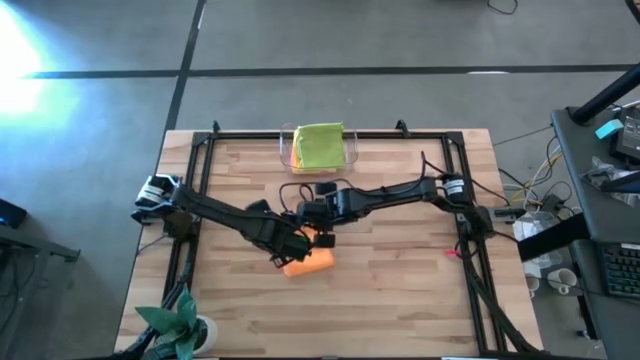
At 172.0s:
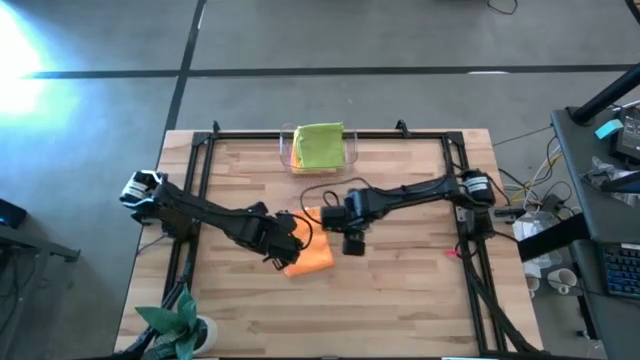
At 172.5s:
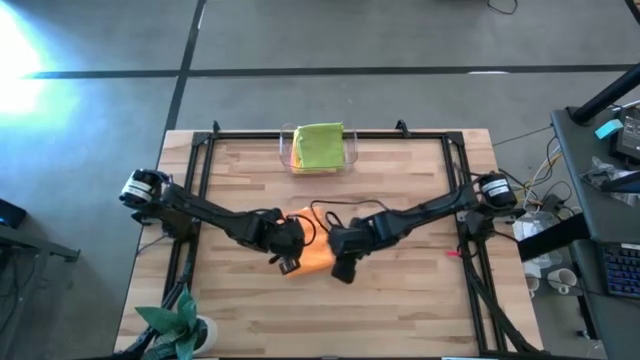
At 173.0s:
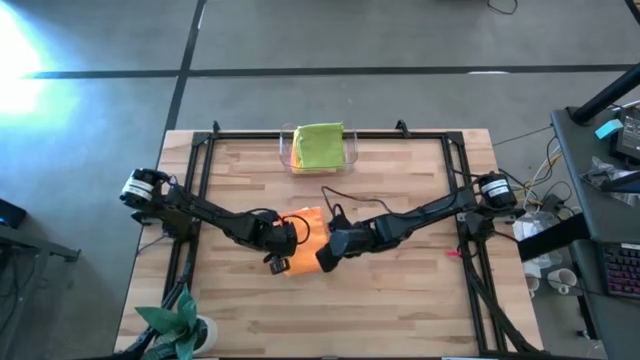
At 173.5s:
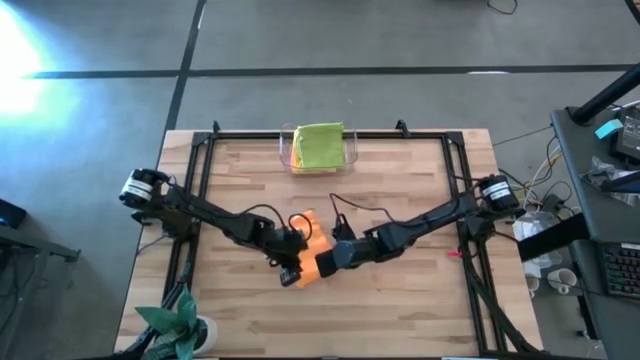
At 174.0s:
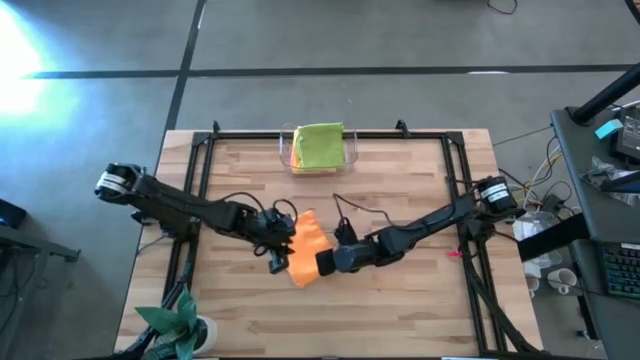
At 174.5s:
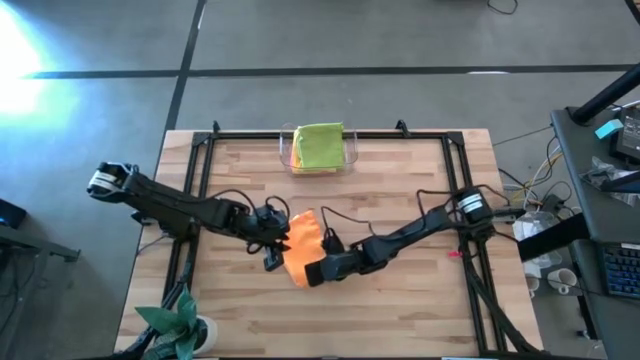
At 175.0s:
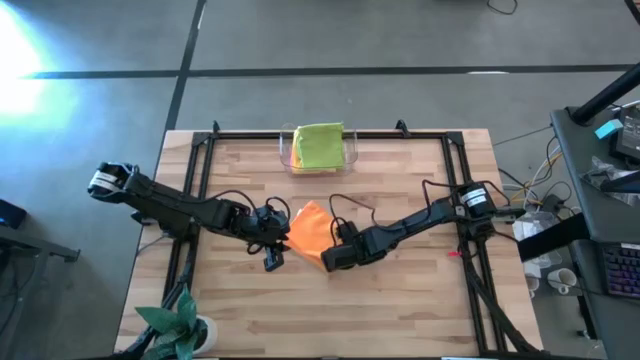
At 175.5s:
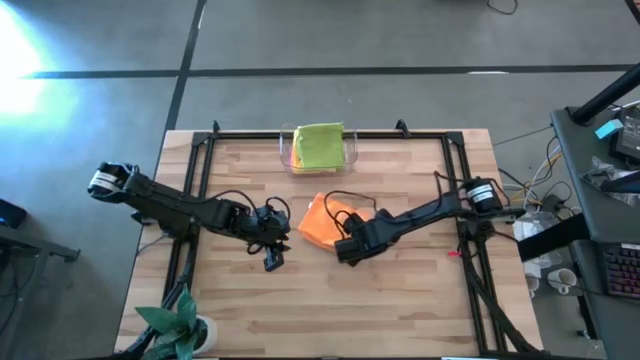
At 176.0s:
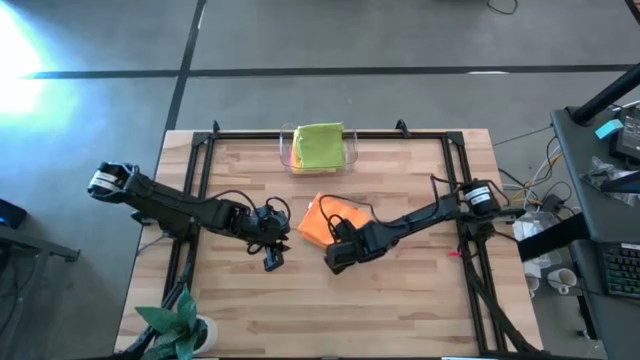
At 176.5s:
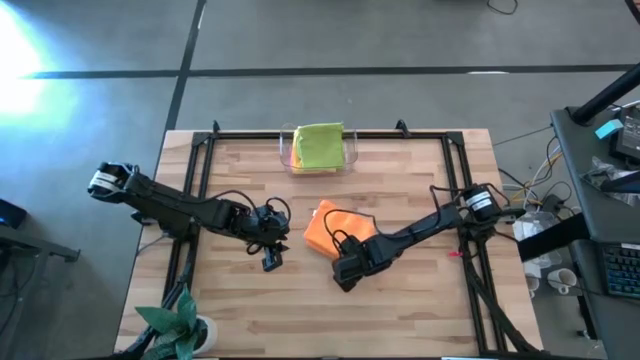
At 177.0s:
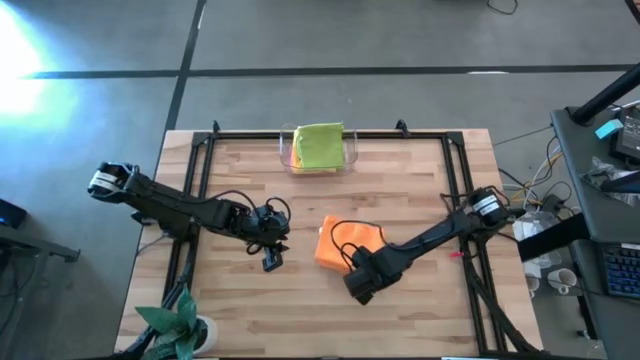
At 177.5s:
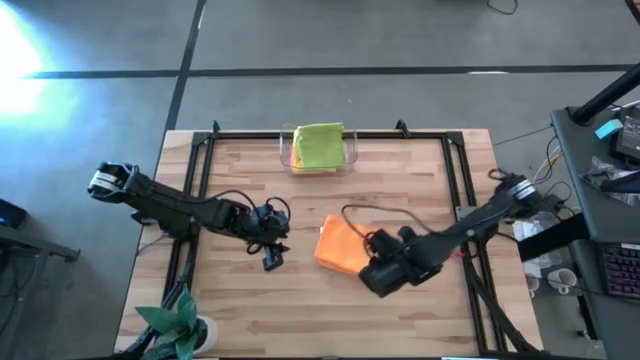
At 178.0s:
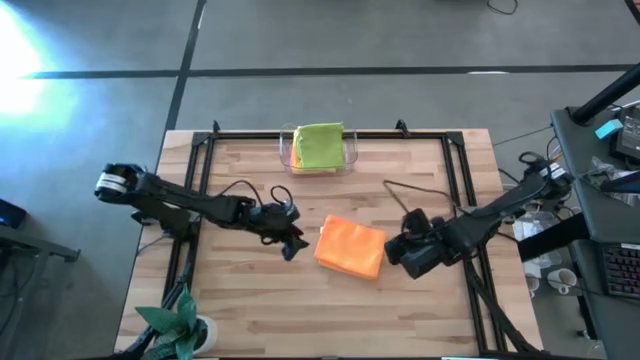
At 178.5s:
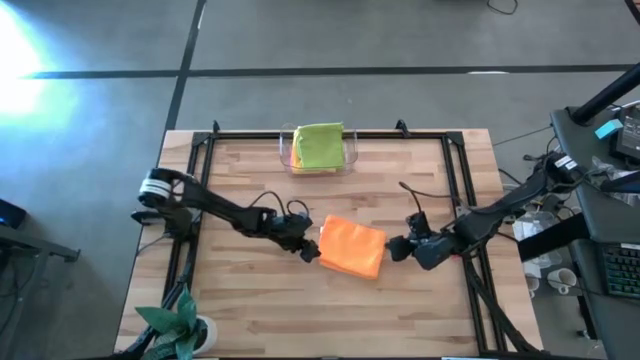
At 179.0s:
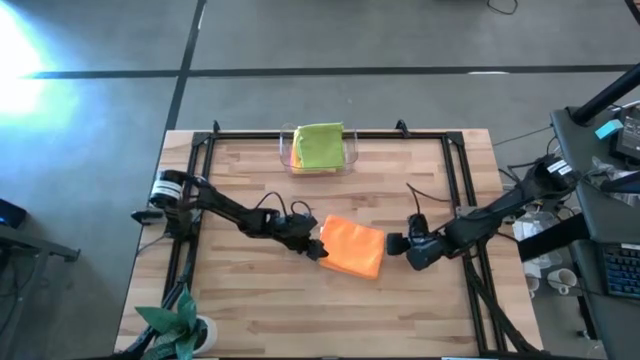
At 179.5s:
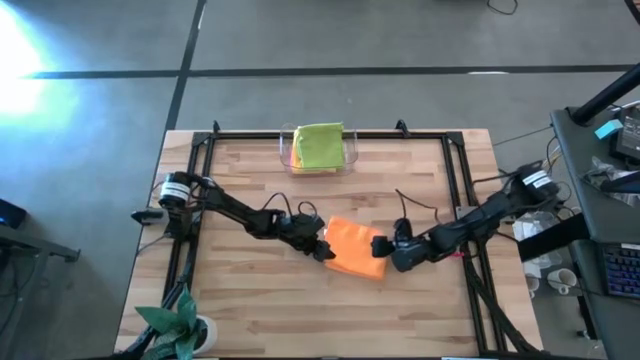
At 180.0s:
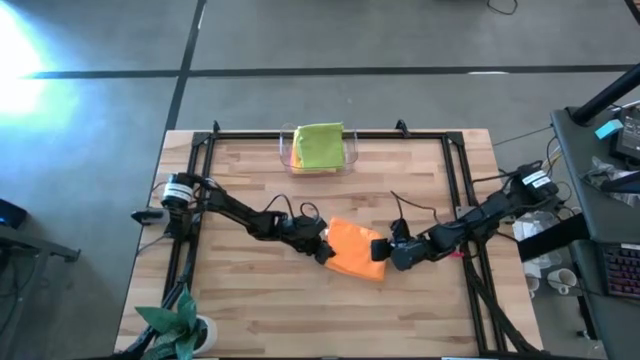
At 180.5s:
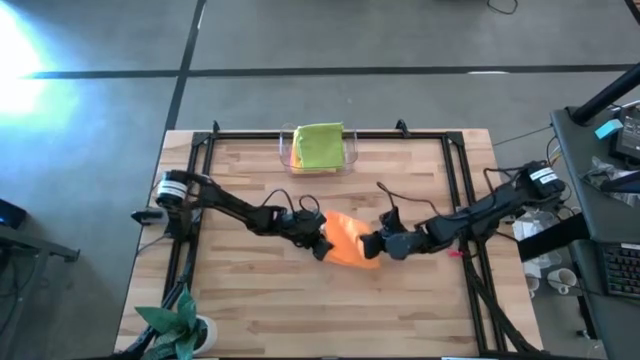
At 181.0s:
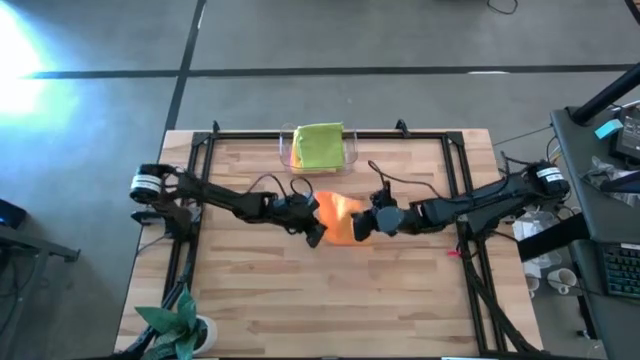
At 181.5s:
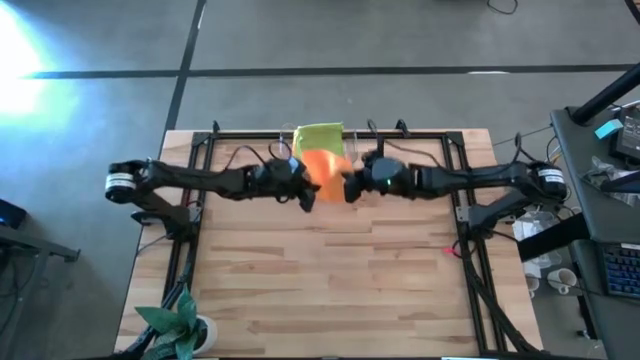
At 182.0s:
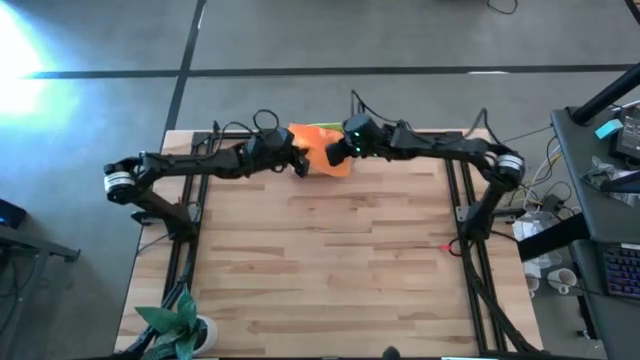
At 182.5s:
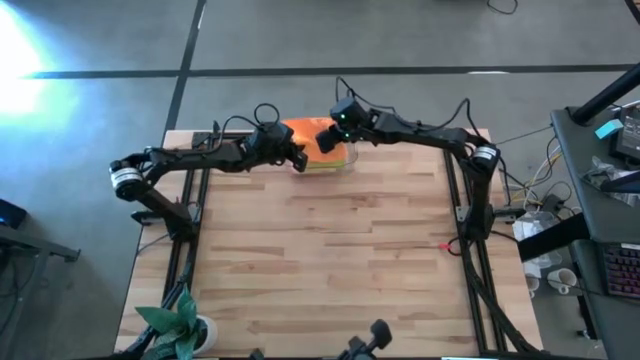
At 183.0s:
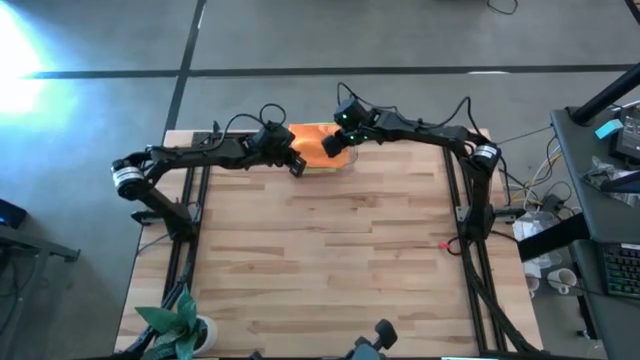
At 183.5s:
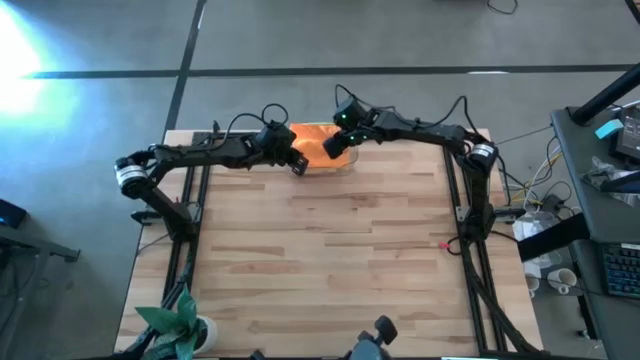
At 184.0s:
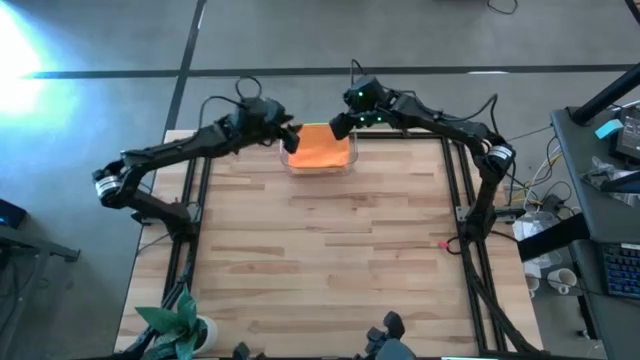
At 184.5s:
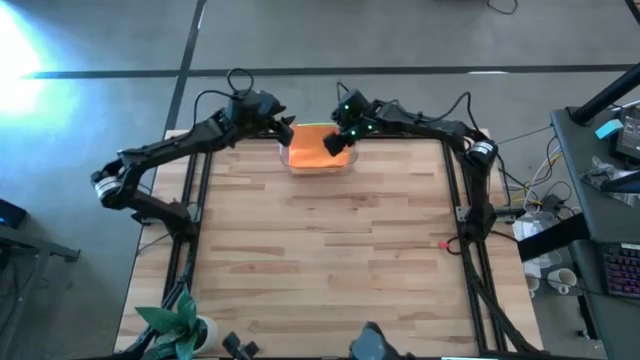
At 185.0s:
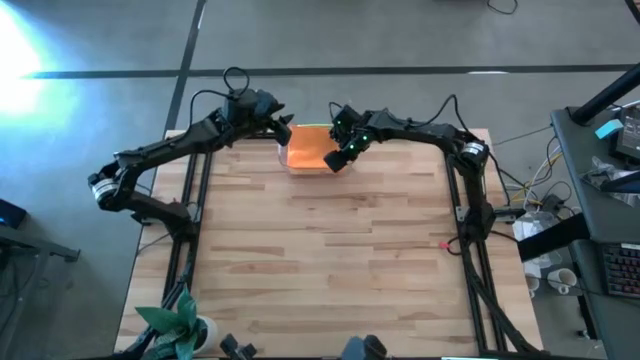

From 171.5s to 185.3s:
Task: Fold microfiber towels
Put the folded orange microfiber cloth into the transparent bin

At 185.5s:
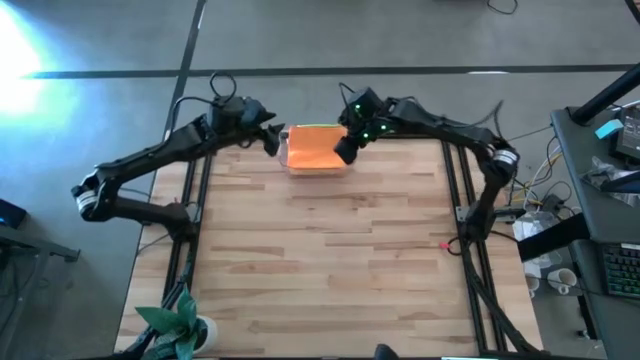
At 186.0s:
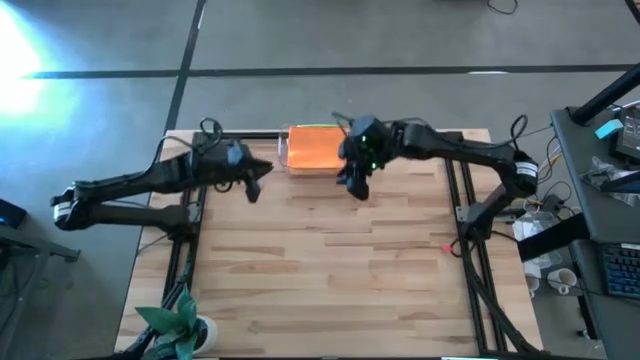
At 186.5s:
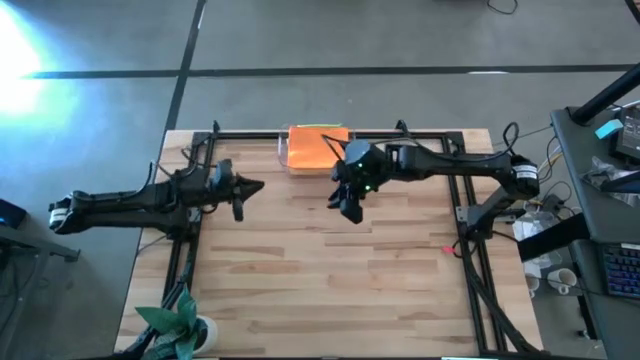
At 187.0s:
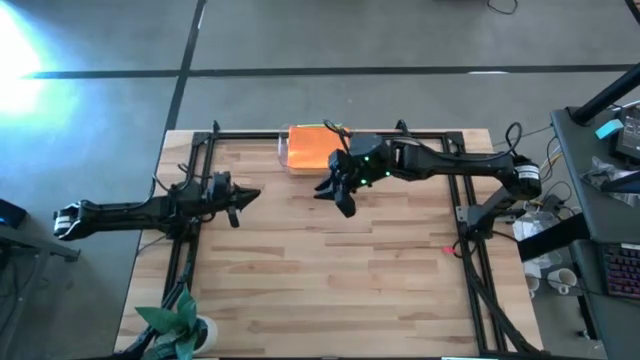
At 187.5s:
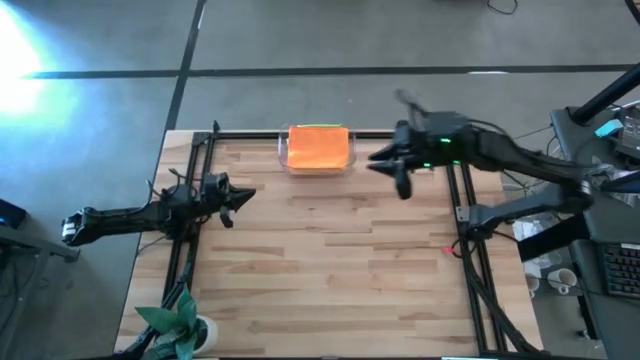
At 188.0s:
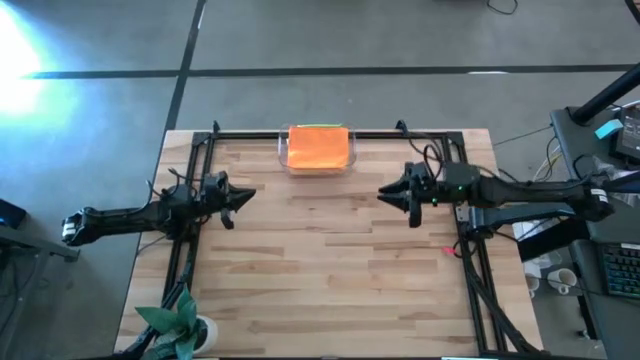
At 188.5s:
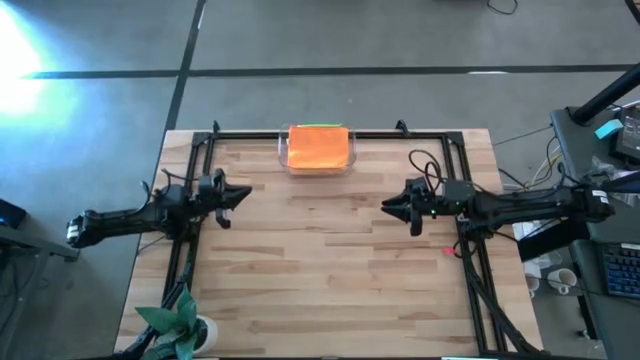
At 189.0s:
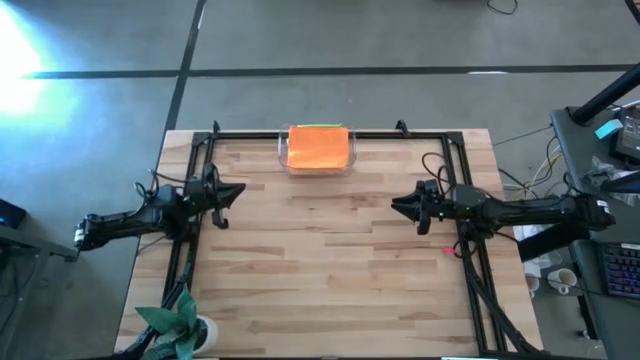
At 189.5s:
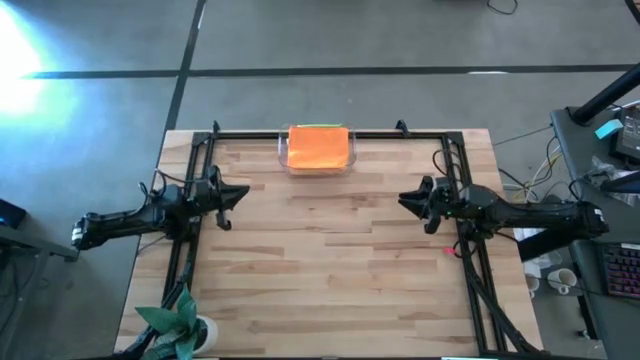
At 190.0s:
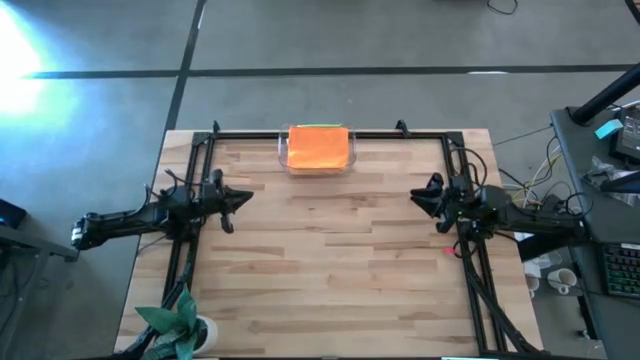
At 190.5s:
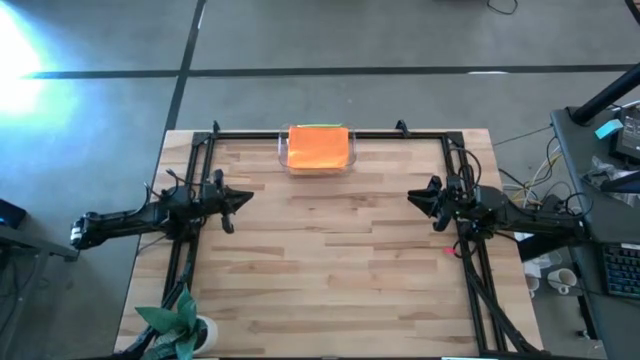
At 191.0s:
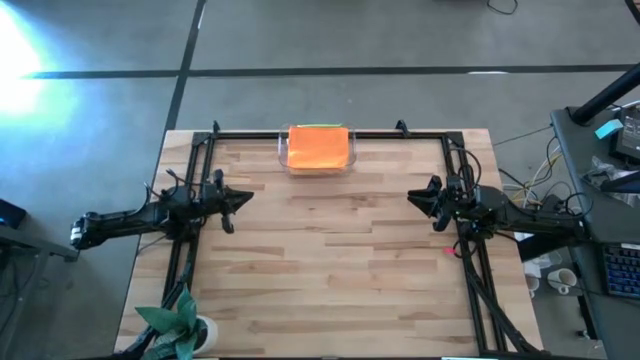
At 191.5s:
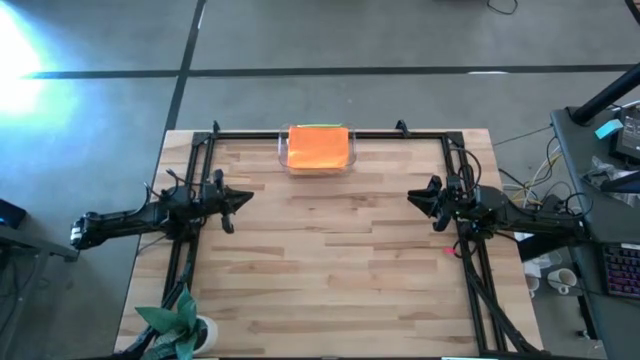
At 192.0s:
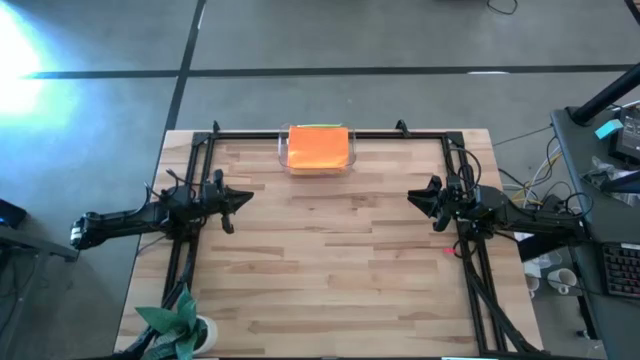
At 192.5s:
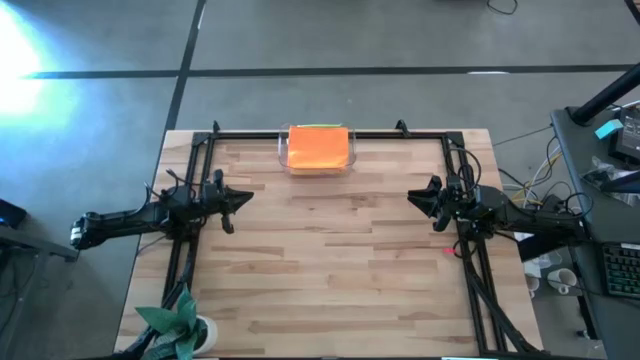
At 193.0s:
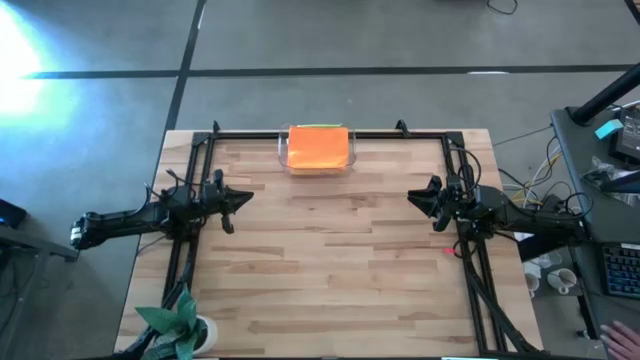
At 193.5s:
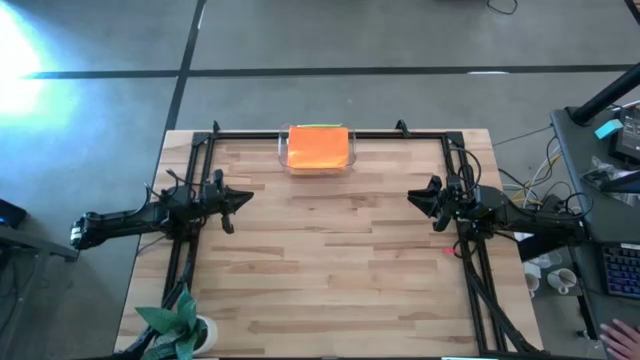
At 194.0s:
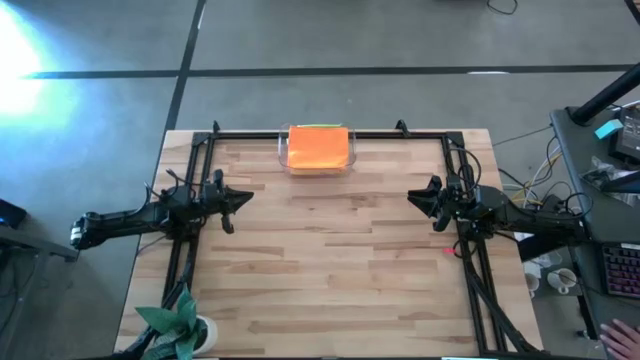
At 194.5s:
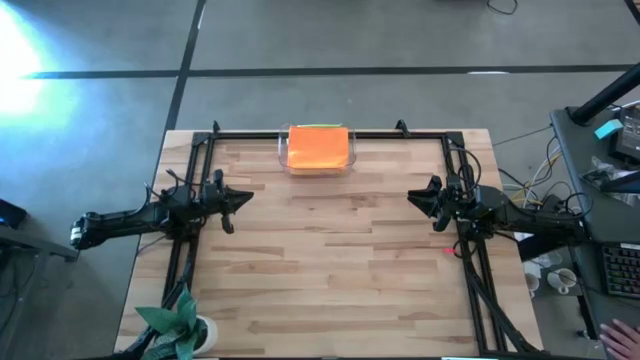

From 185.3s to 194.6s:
Return to Home Position
